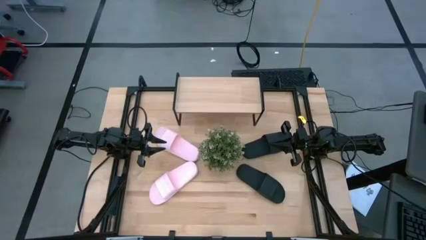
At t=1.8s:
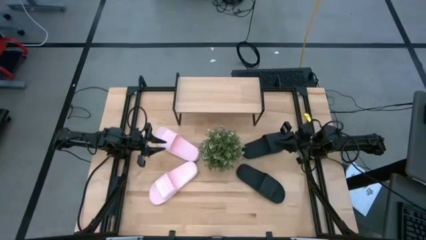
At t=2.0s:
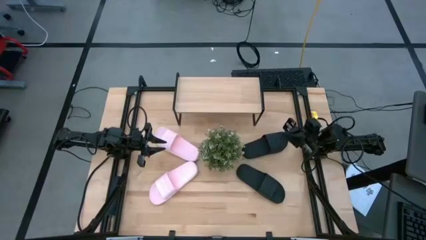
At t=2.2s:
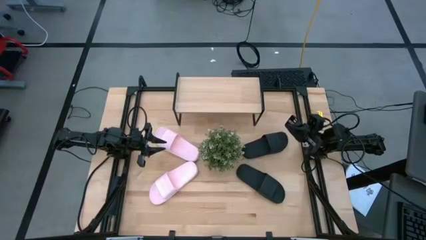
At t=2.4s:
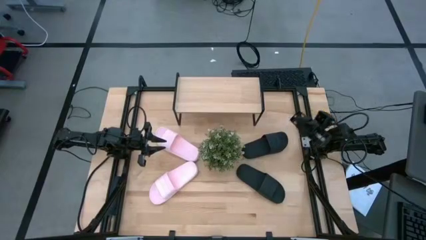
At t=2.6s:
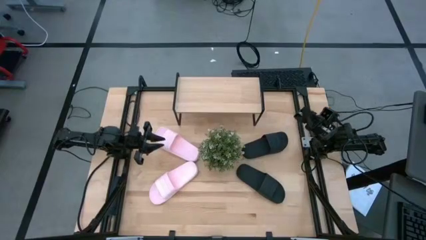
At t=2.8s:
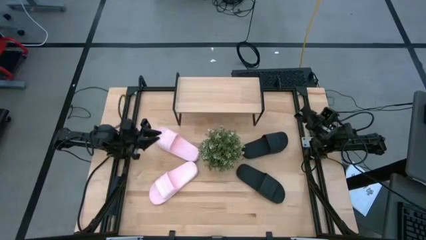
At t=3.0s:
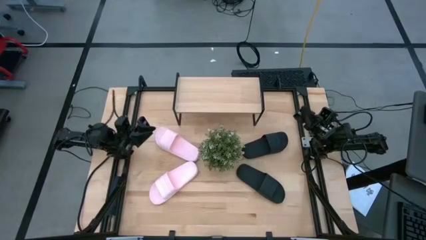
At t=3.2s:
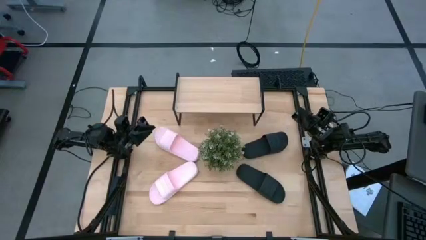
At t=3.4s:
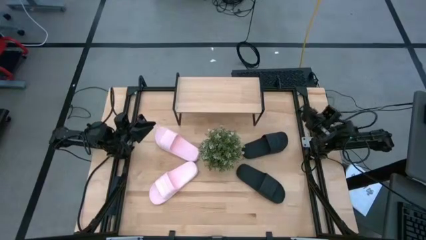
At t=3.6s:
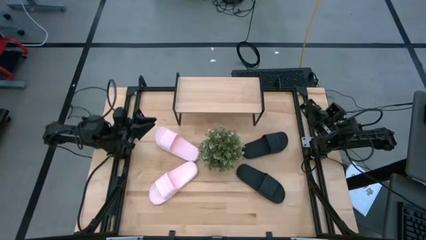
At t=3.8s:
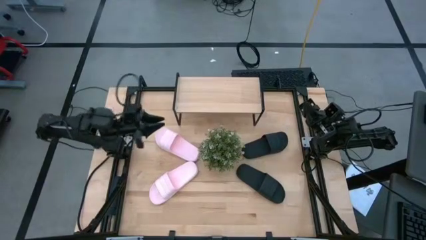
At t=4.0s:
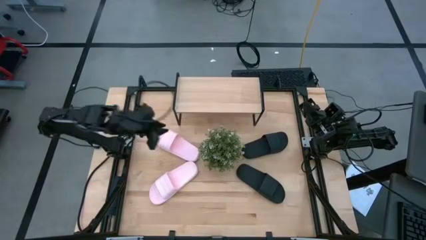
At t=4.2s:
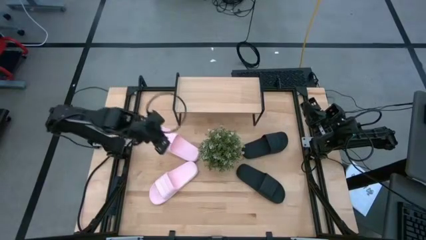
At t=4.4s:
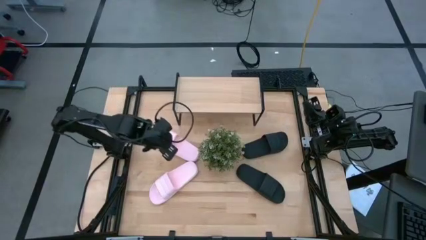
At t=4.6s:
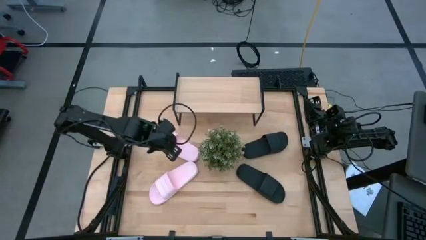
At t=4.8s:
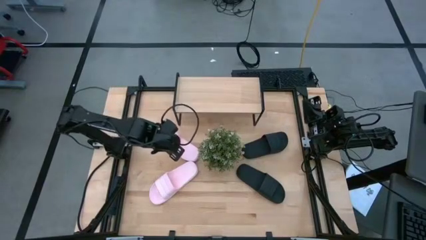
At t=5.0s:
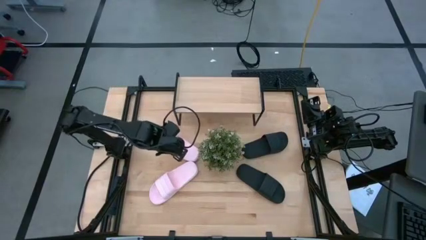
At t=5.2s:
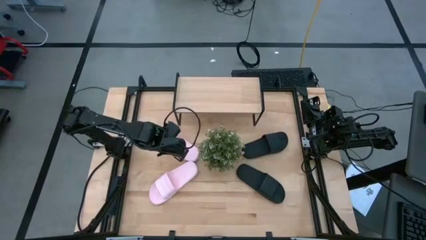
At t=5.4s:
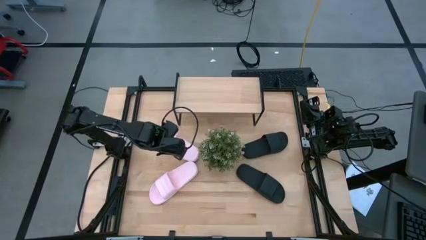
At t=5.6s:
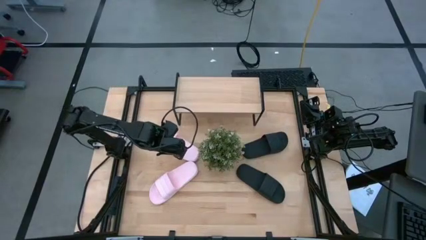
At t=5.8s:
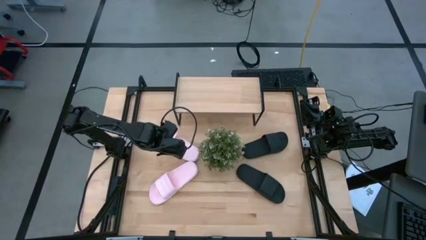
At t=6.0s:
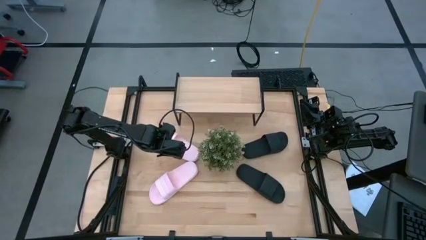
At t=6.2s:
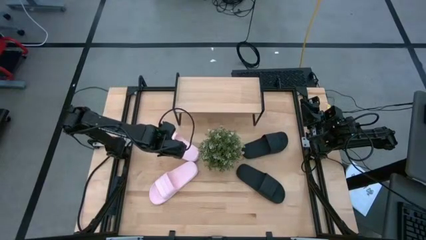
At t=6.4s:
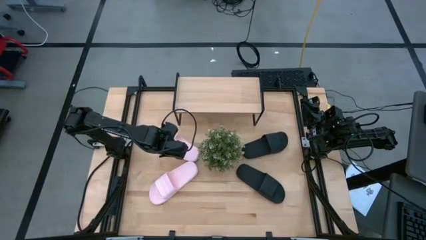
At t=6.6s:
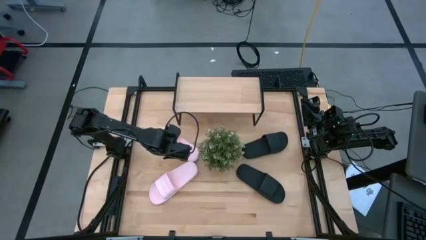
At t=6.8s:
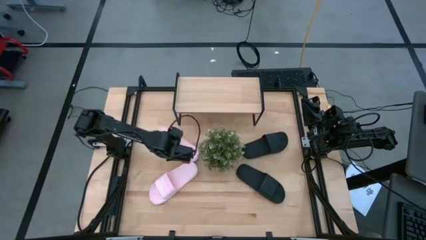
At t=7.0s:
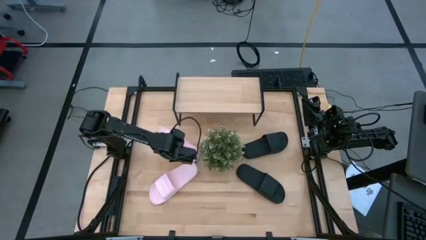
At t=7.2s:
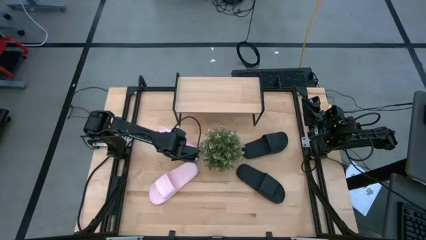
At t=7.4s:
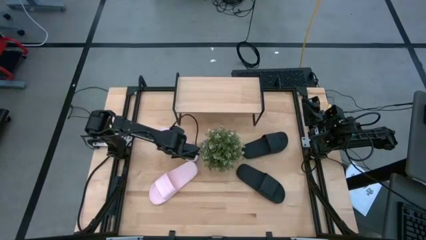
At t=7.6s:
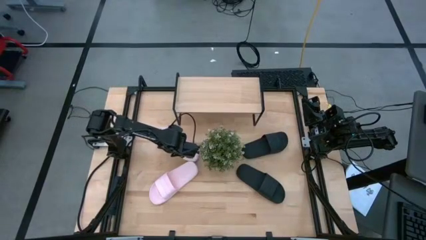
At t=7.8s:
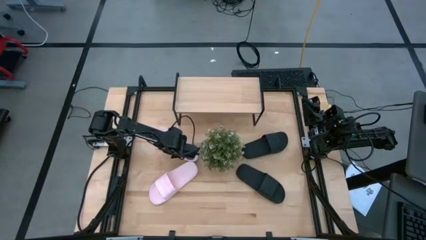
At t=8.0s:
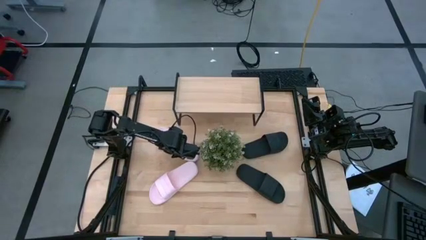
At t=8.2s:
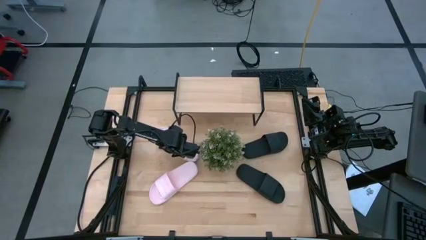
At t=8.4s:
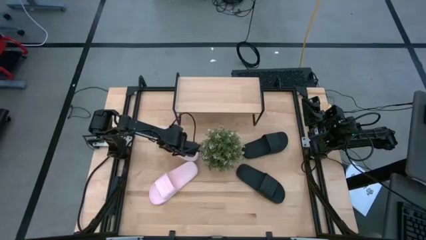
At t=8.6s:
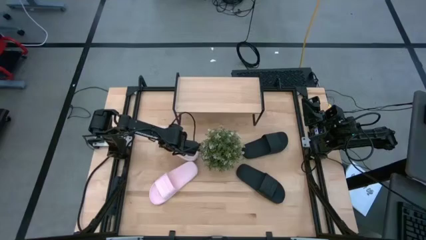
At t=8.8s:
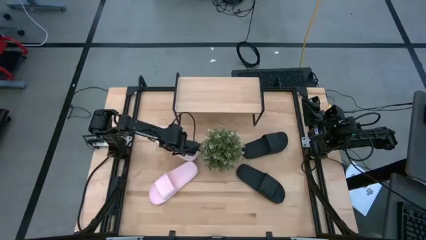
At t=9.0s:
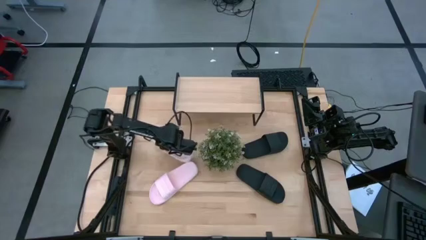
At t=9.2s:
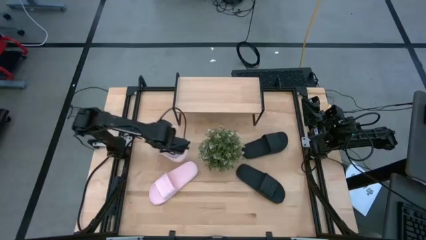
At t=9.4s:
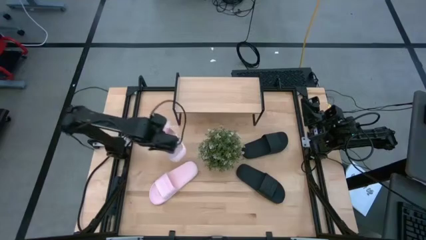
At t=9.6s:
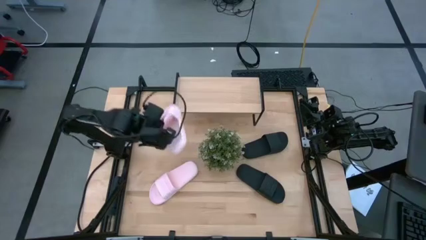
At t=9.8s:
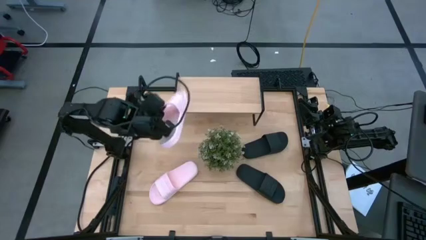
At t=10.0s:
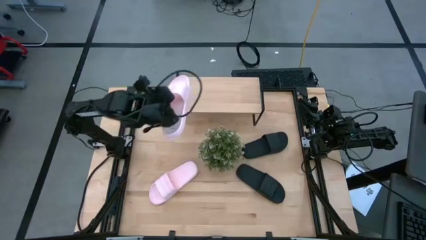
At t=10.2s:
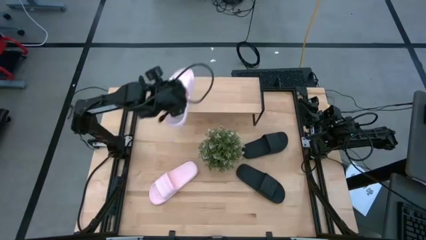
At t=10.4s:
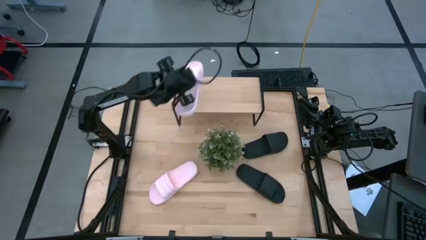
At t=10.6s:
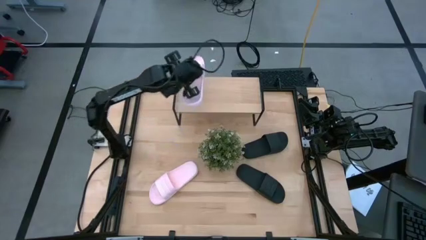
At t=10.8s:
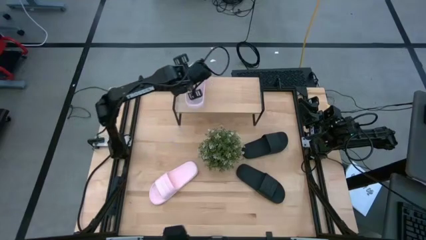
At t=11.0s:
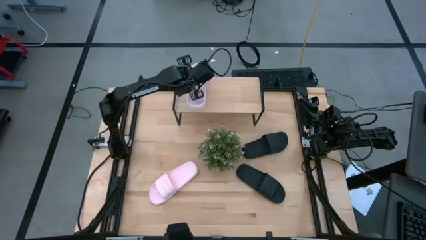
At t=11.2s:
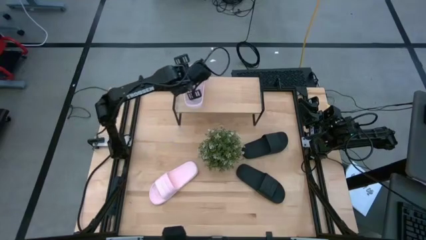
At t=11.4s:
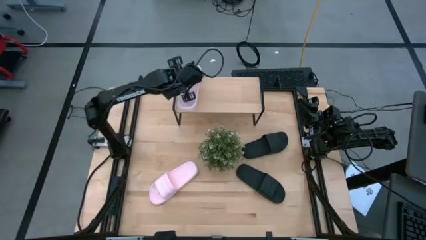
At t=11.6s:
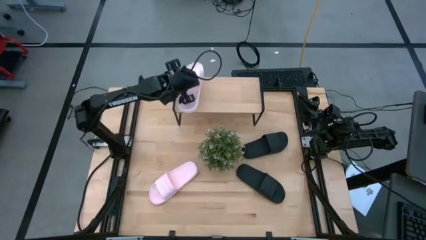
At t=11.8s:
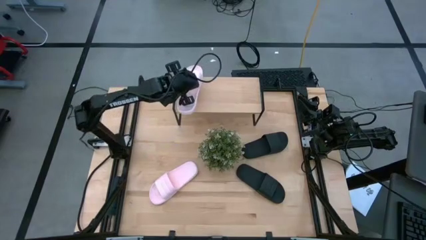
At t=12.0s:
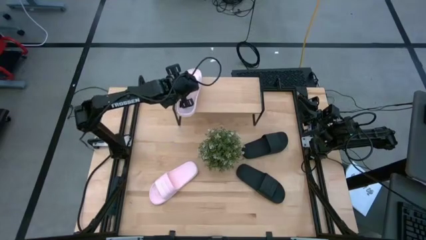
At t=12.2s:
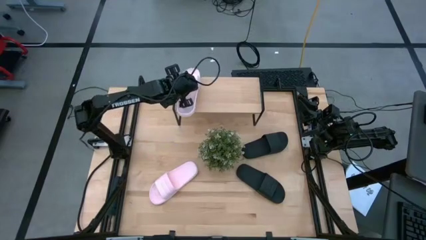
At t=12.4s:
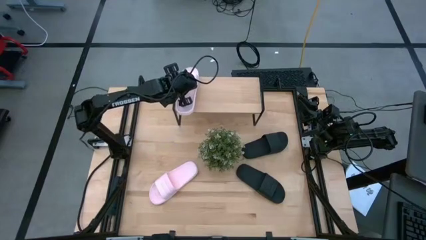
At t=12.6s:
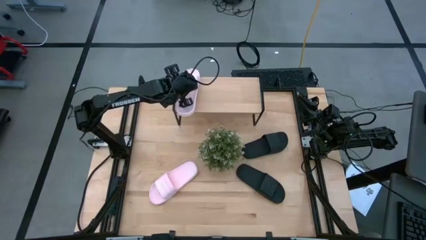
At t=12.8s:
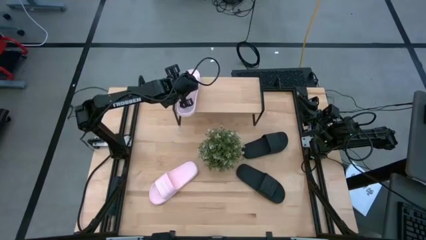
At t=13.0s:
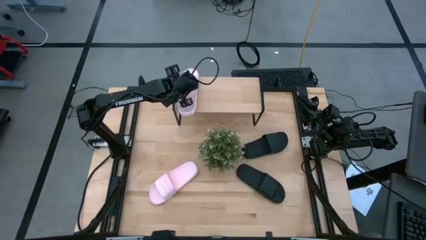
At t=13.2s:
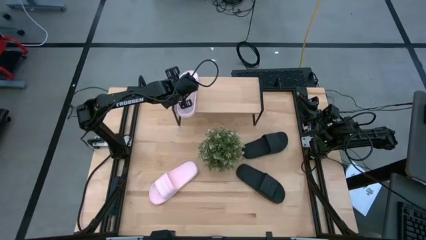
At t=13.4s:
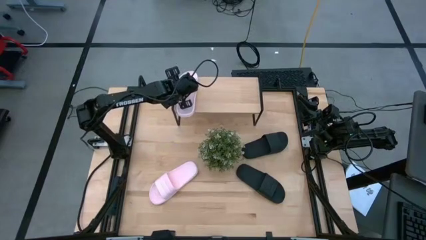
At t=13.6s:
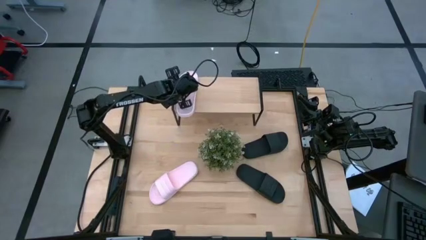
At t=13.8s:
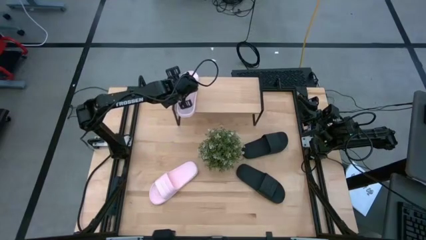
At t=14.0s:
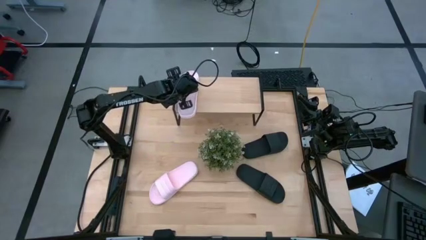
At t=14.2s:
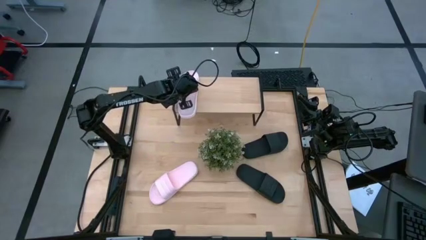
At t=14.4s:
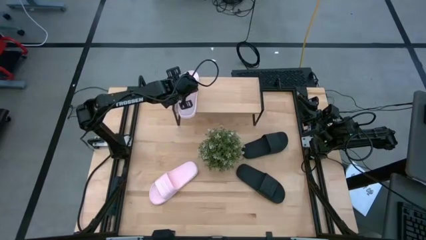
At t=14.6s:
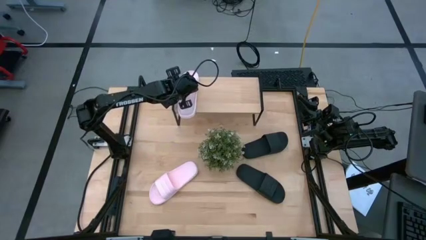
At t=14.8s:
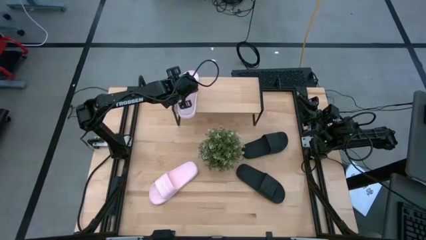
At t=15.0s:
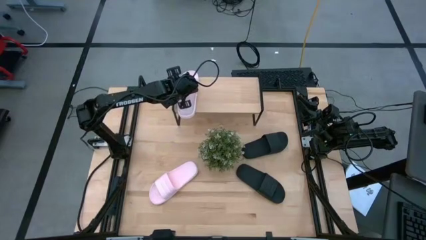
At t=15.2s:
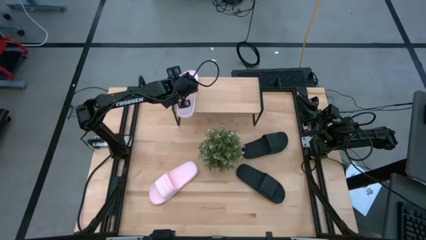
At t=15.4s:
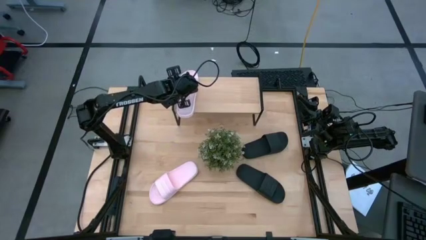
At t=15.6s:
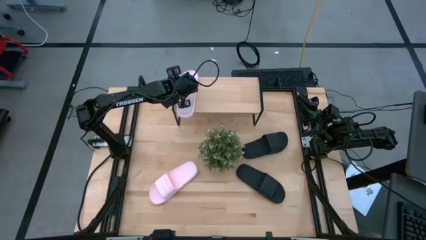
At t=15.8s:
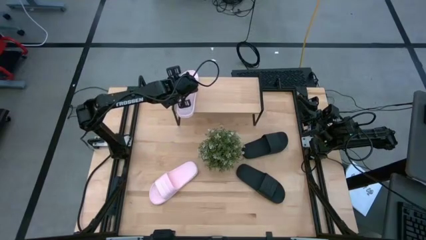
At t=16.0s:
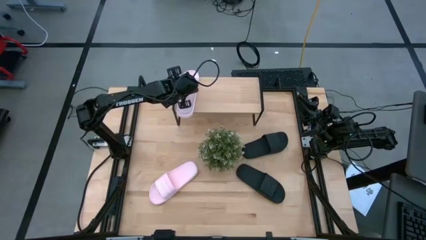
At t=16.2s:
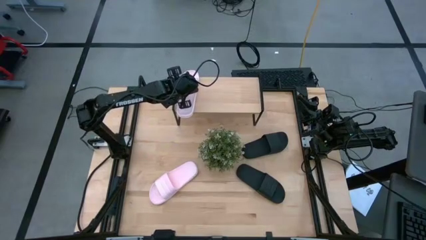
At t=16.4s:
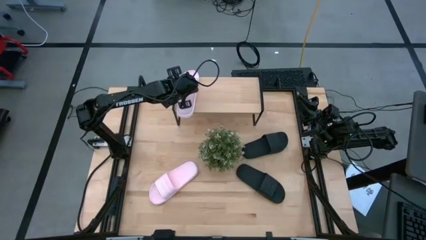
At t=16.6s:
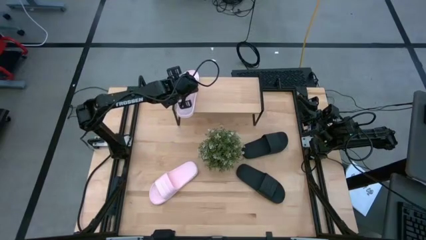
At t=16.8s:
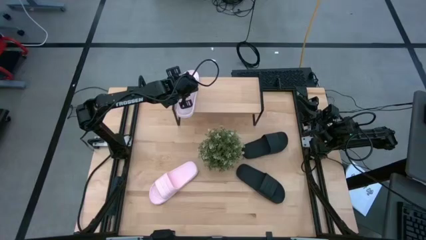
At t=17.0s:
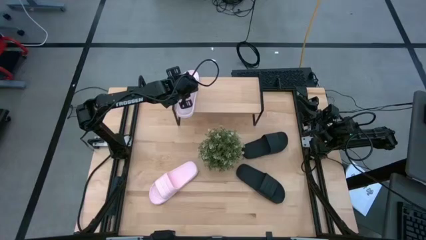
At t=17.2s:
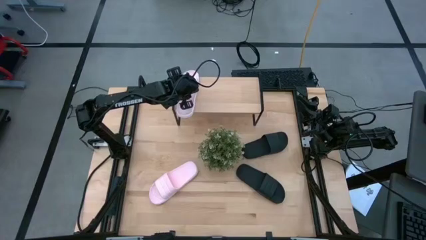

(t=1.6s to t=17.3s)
Task: Pick and place slides into the shelf
Put the top pink slipper on the shelf
